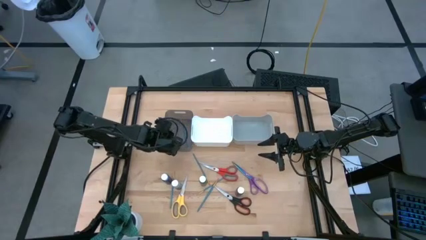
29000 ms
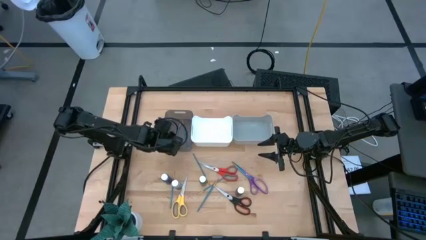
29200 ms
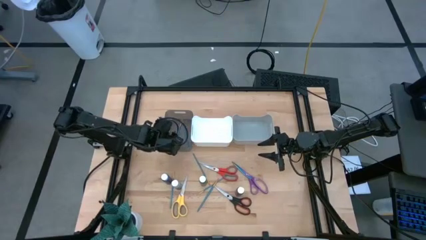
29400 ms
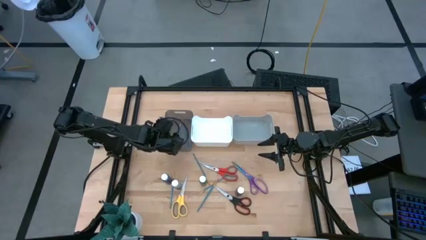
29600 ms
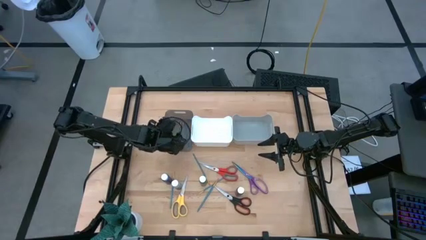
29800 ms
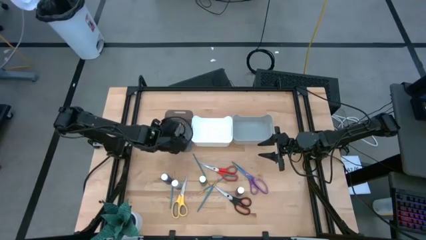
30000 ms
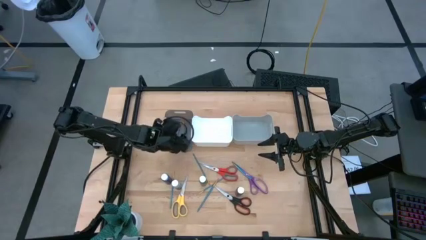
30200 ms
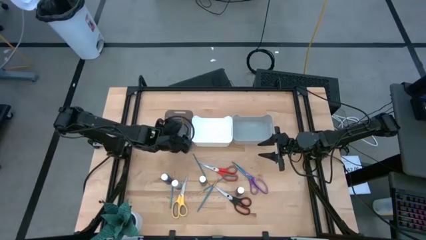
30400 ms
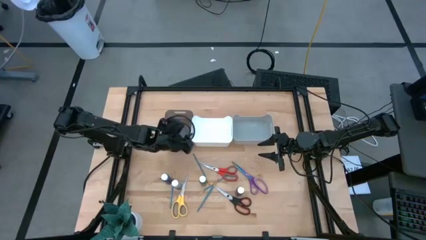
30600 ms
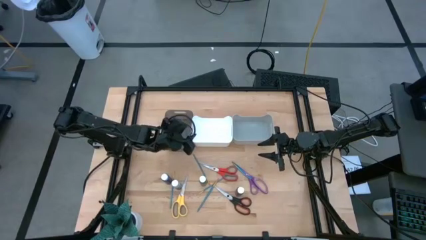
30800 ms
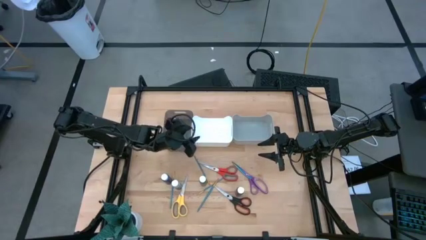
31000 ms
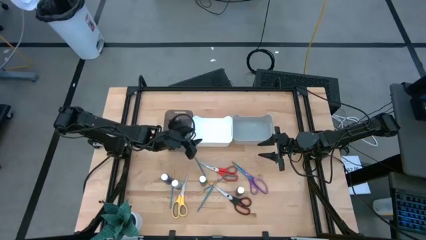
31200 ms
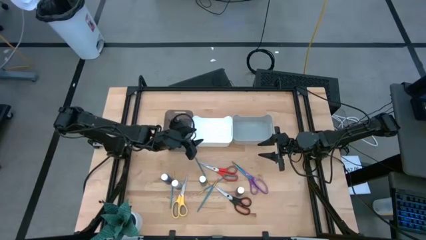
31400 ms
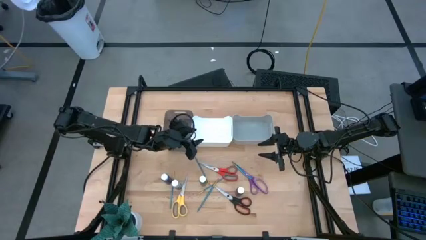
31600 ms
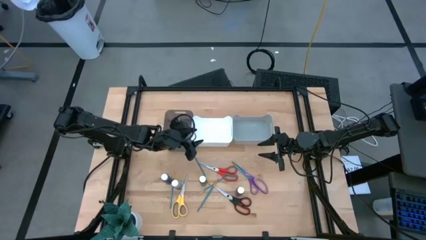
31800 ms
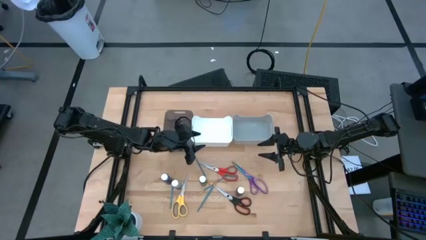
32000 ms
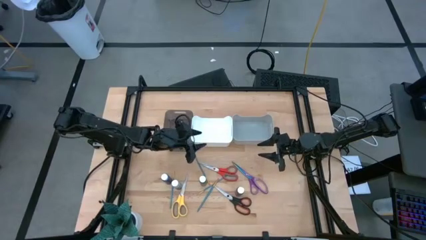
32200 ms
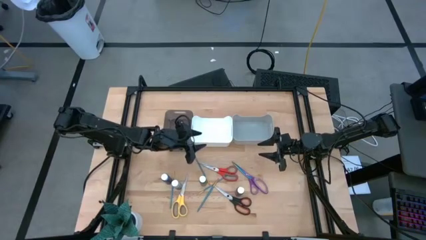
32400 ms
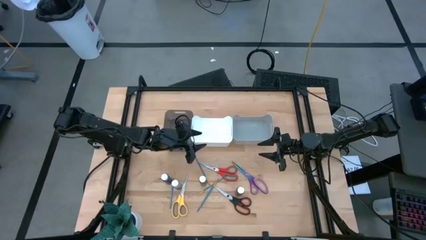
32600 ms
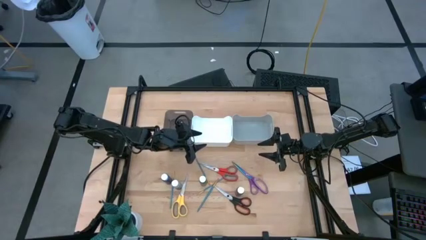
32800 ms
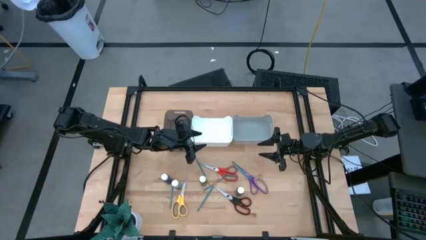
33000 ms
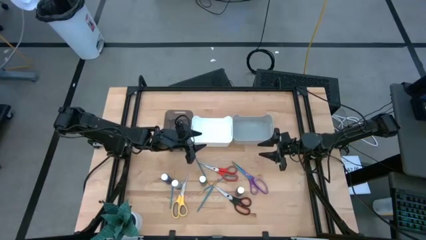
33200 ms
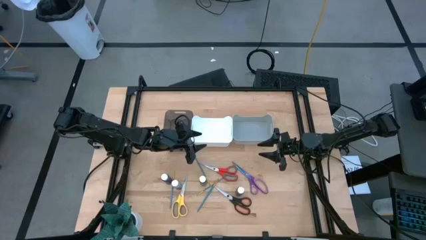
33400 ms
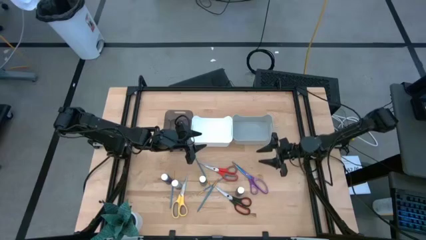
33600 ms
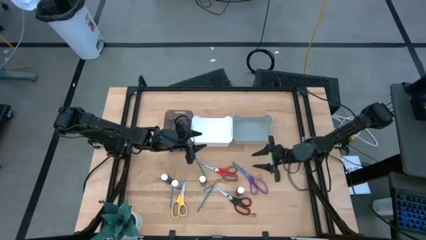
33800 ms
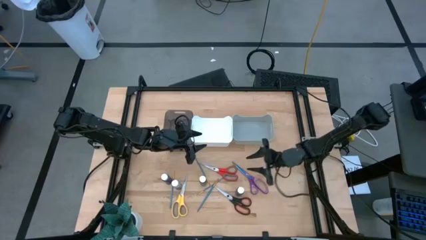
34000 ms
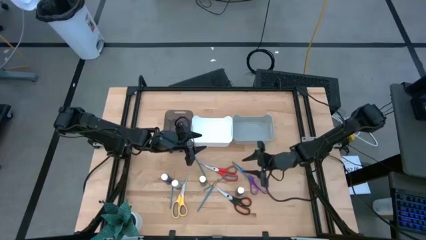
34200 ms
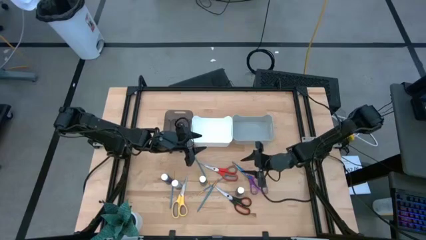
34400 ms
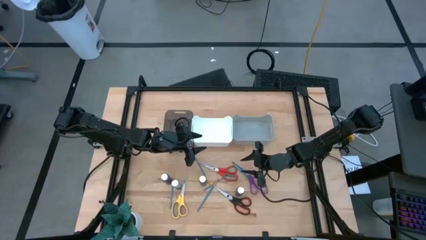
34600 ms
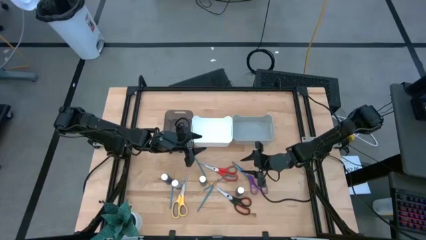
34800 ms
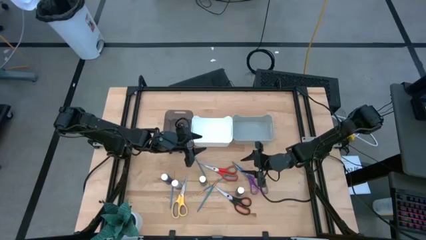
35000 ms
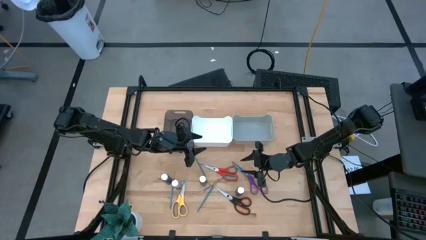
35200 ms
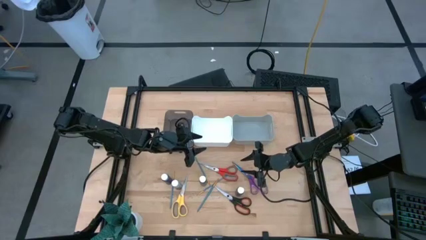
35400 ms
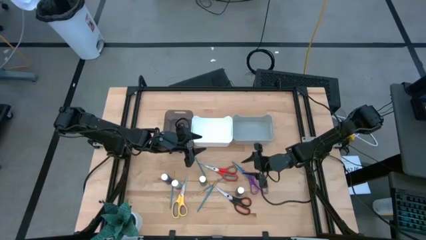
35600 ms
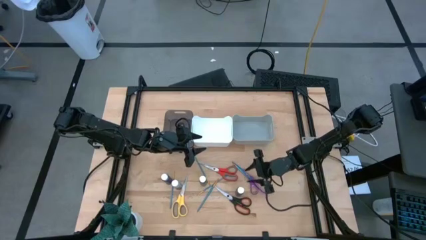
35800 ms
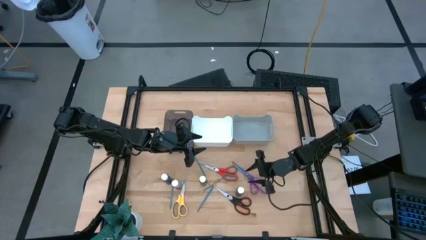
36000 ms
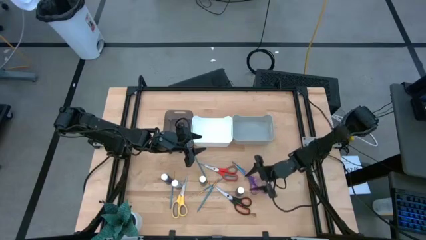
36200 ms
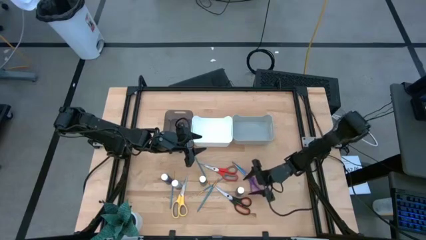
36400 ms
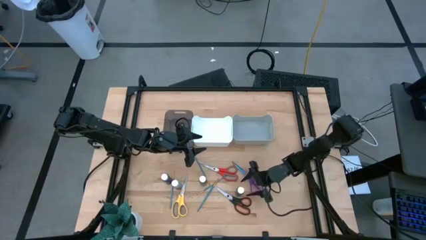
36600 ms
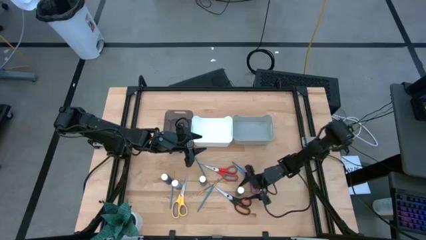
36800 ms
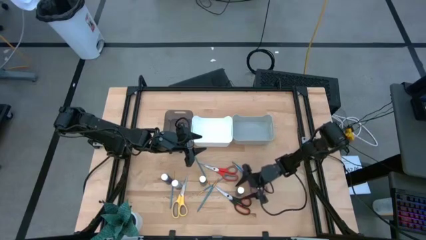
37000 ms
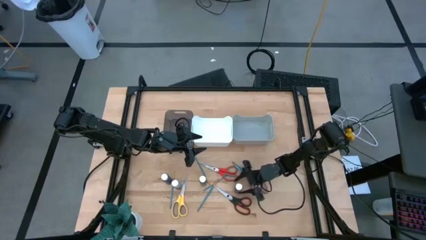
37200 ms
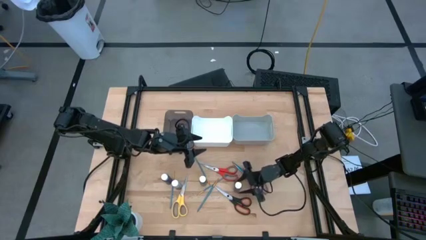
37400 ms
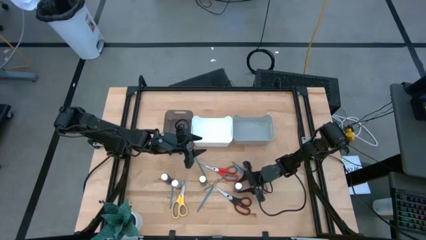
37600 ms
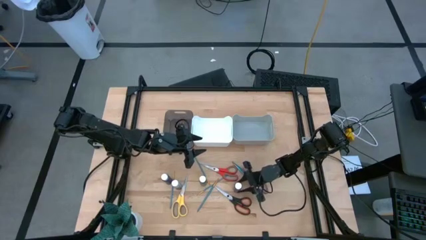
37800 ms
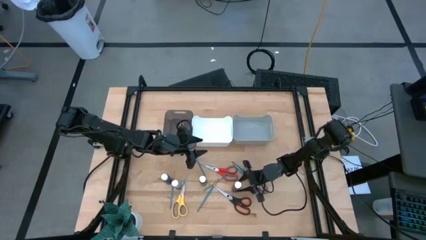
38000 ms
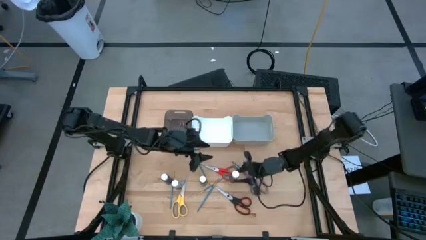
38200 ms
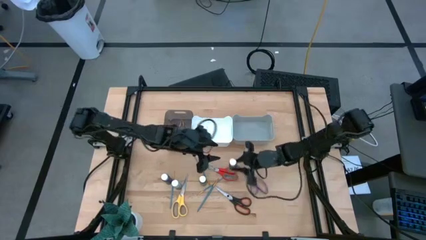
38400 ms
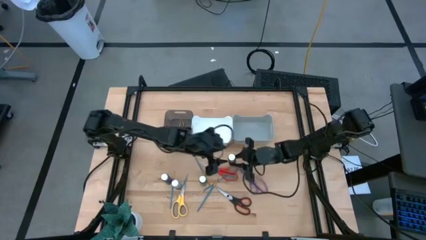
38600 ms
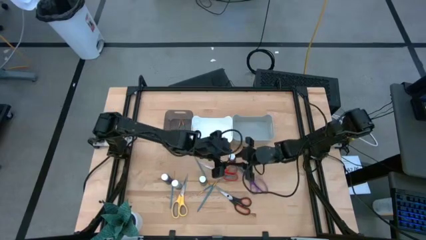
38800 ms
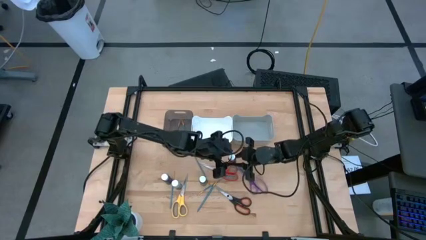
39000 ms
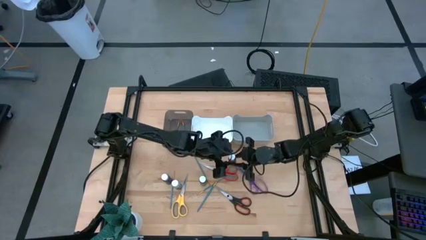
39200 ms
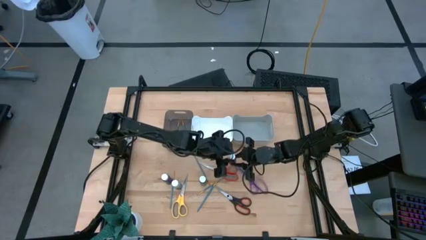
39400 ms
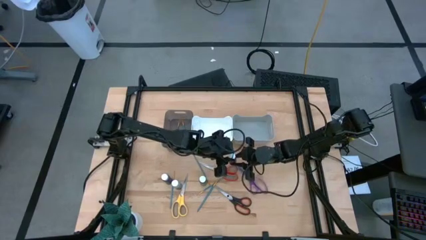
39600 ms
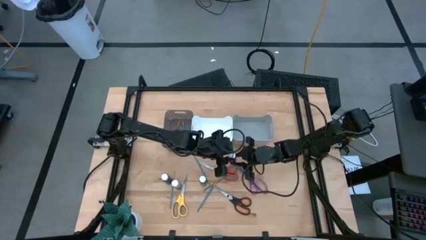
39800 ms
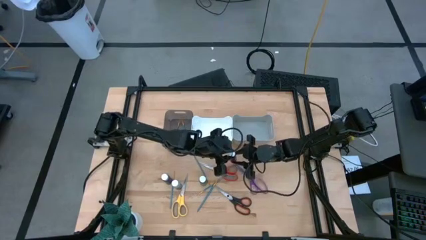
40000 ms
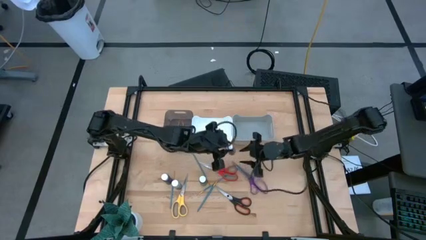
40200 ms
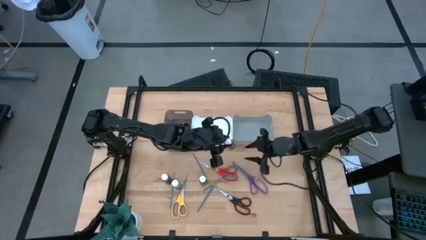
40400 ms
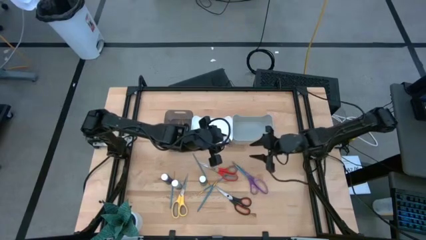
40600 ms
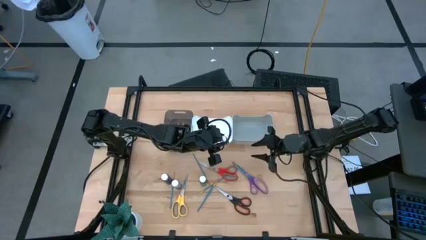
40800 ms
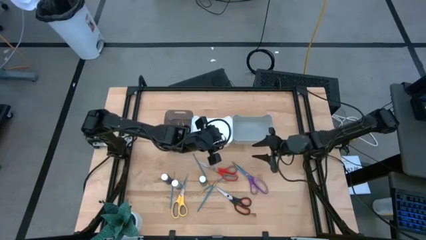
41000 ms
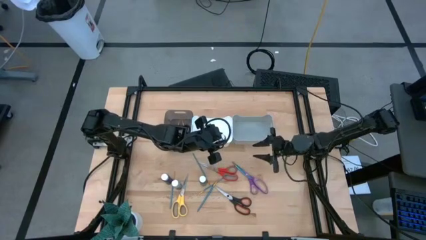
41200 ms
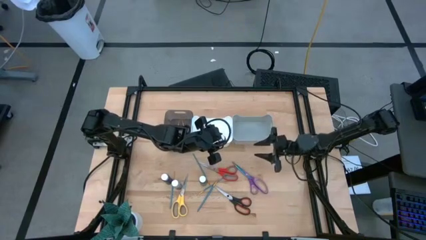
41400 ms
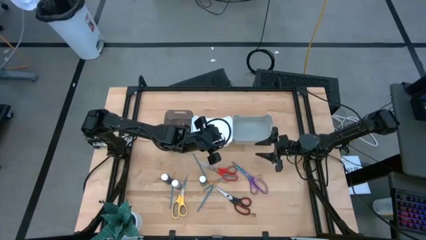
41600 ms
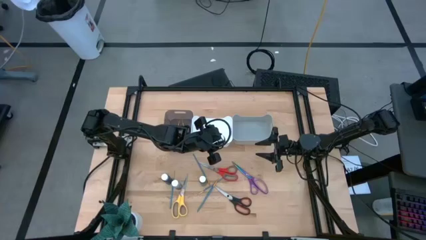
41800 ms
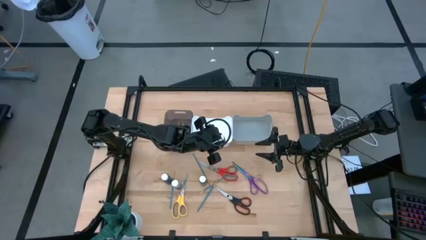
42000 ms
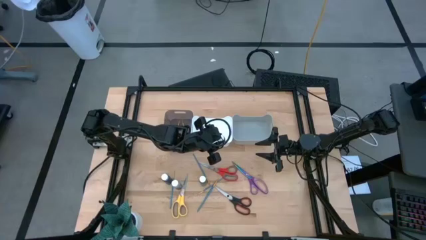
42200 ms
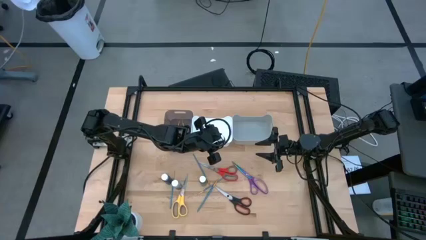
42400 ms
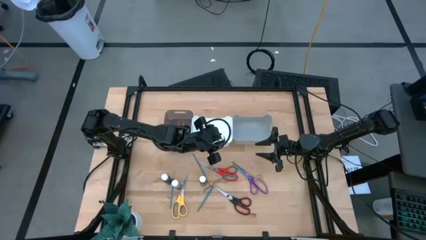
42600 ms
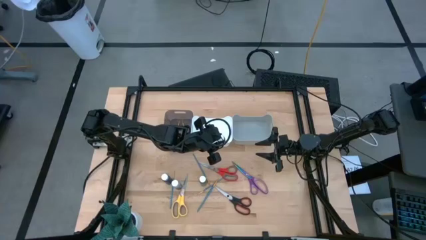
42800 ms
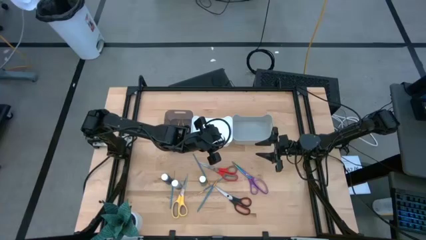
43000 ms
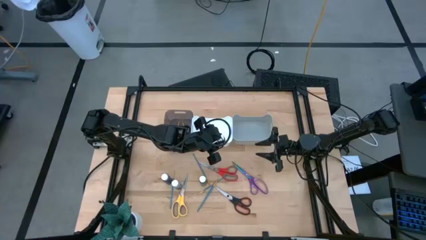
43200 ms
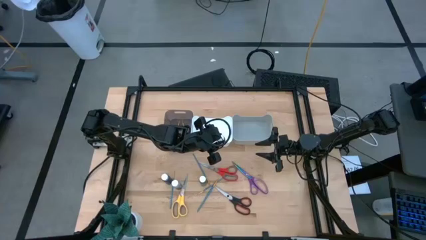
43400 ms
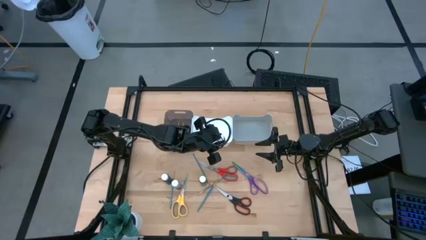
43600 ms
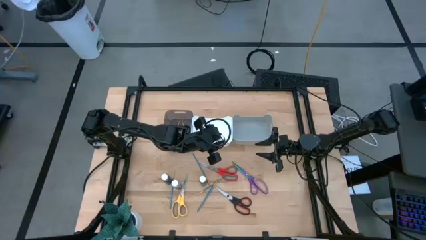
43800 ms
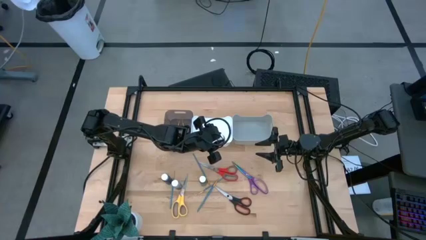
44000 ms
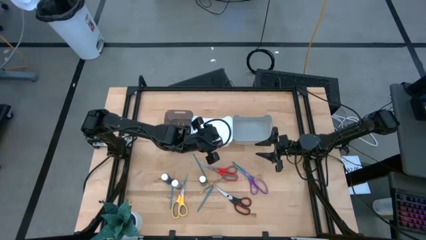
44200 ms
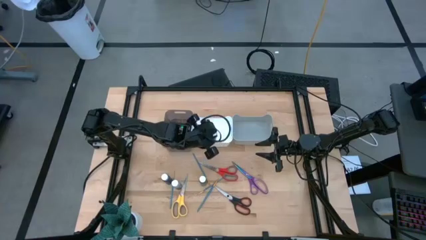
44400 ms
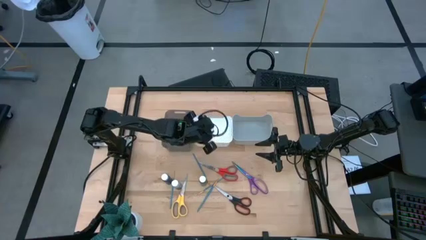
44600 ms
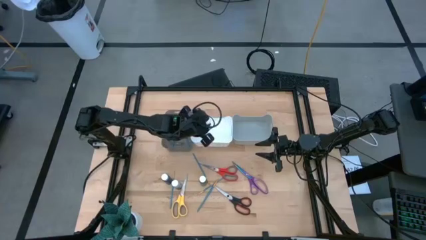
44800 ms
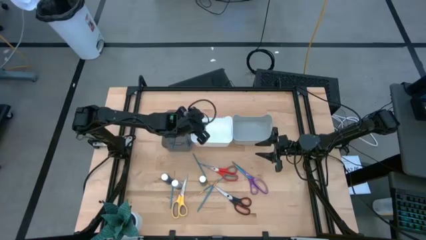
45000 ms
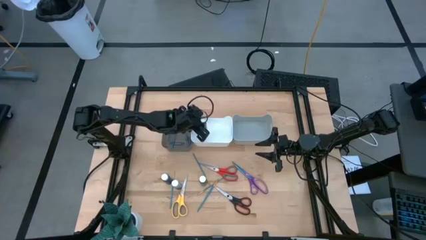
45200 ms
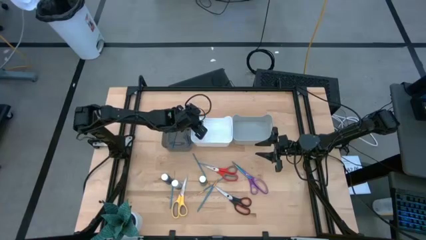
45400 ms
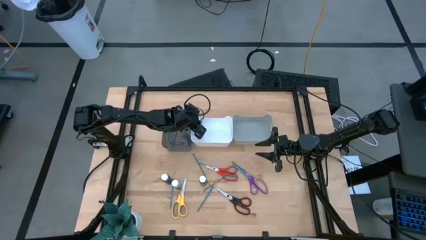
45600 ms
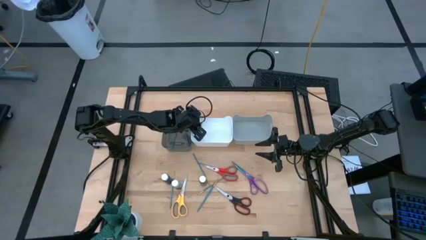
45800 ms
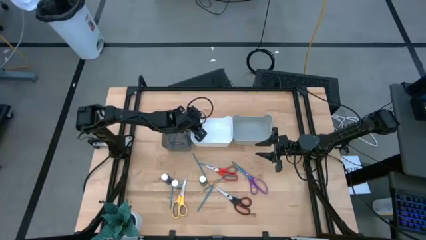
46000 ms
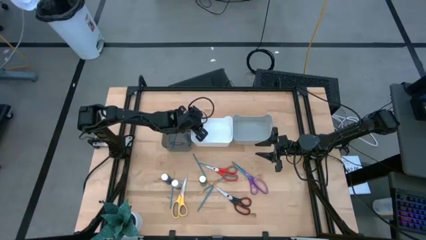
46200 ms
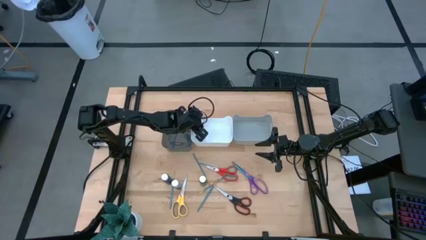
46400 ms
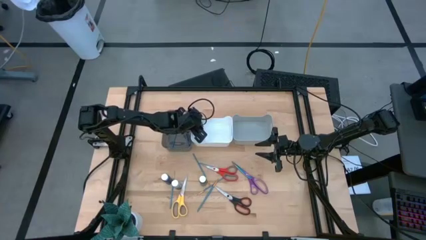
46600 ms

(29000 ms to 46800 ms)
Task: Pick & Place Paint Supplies
Put the brown paint bottle into the white bin
